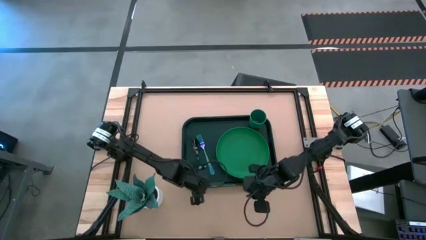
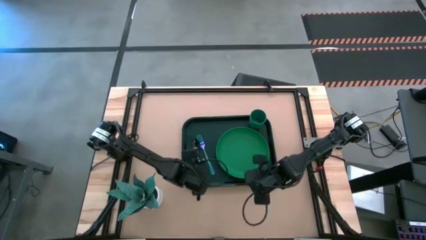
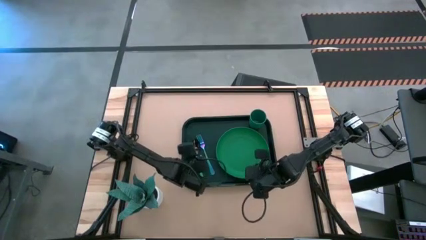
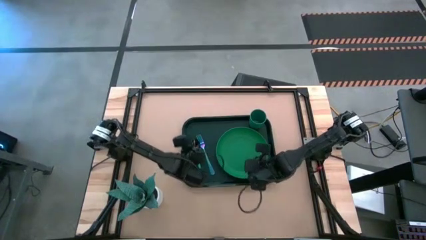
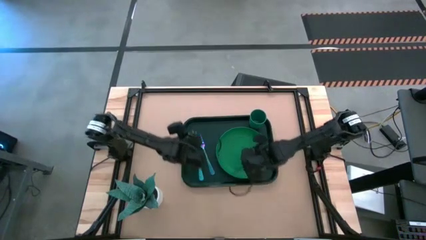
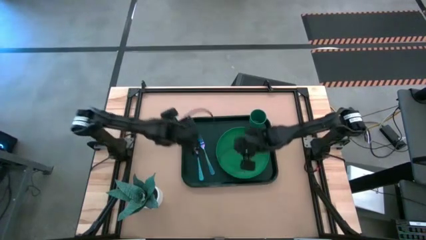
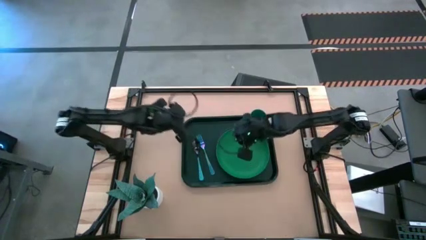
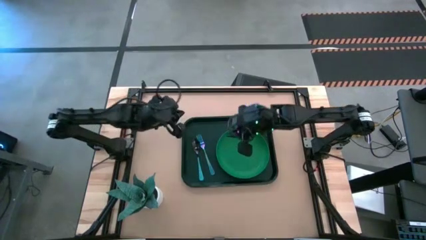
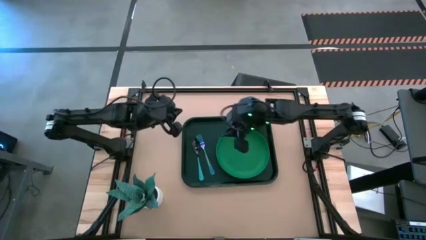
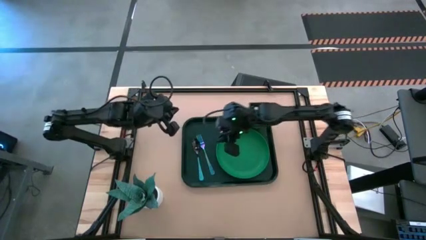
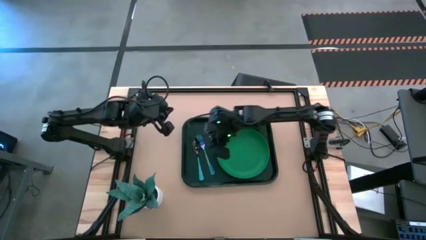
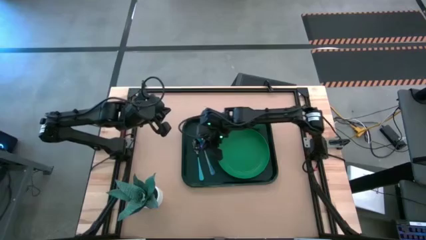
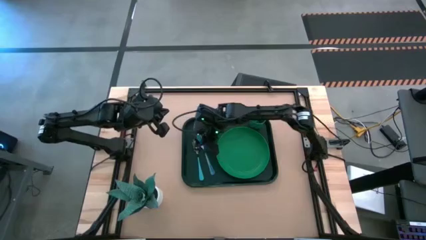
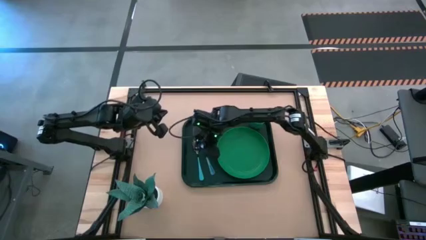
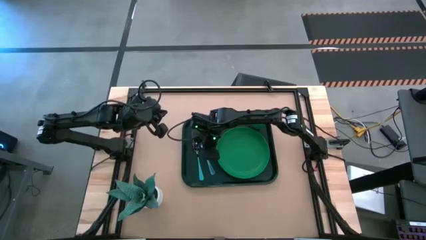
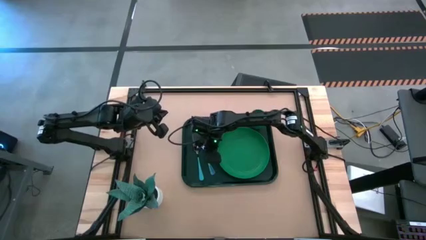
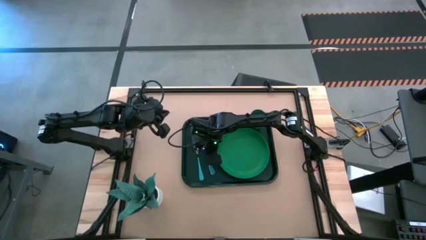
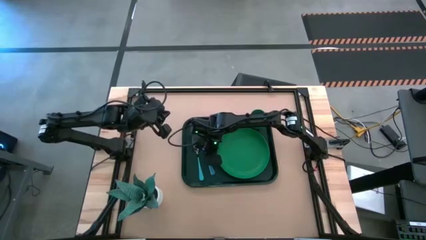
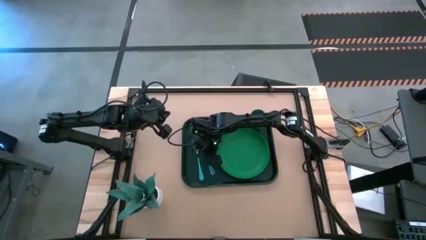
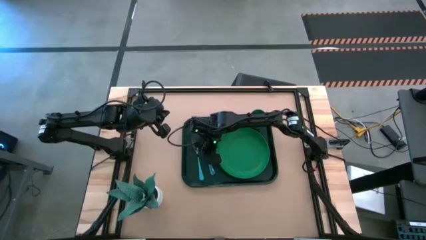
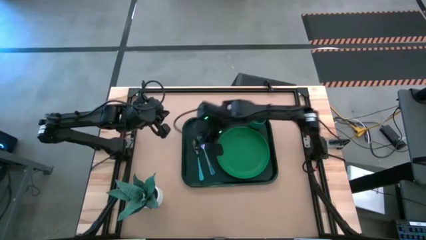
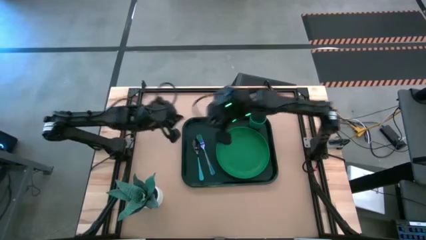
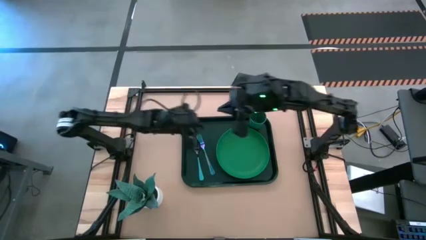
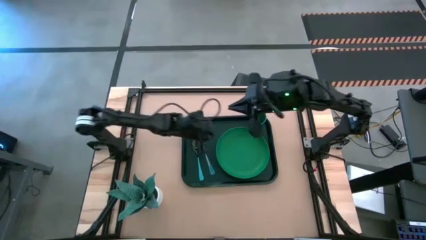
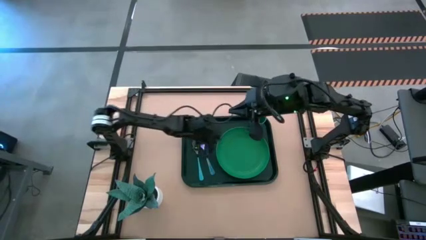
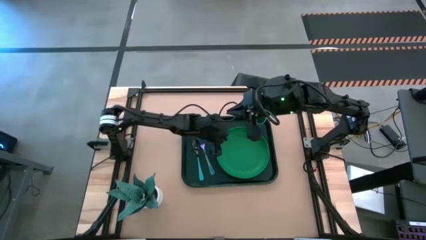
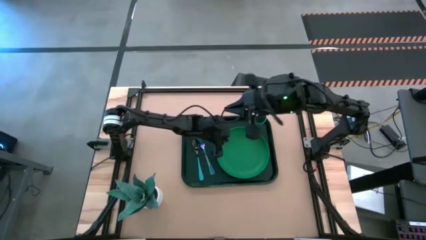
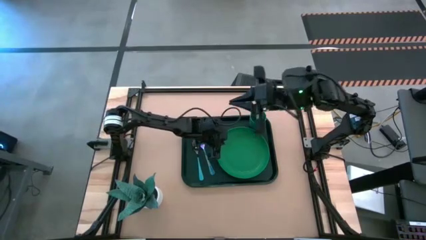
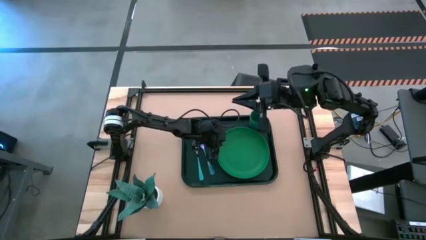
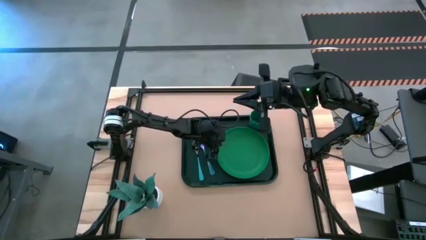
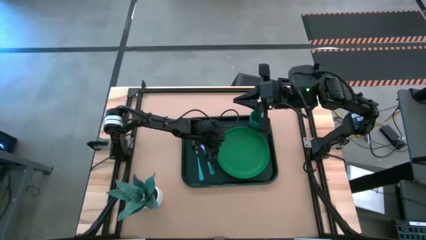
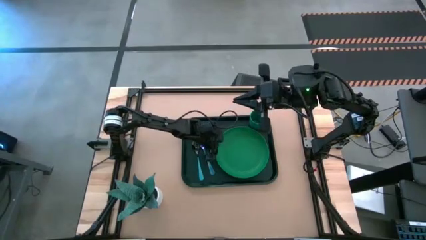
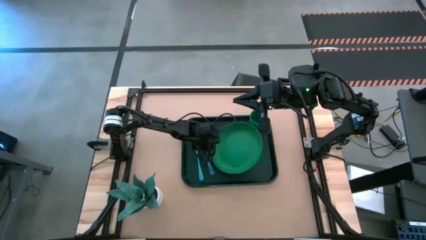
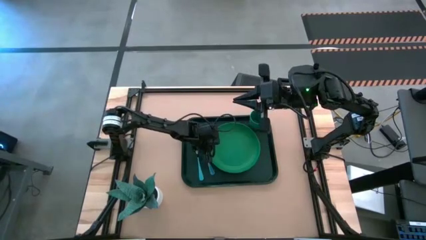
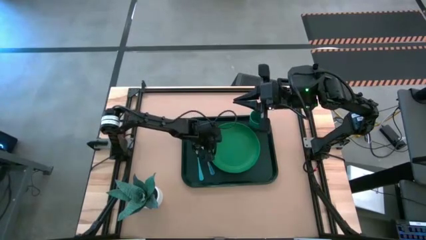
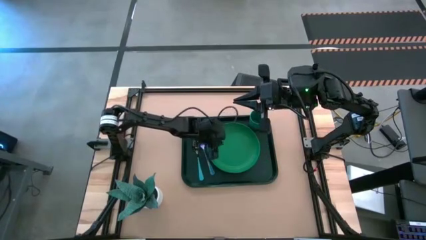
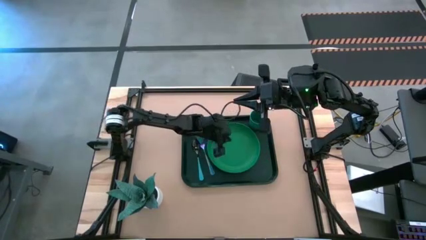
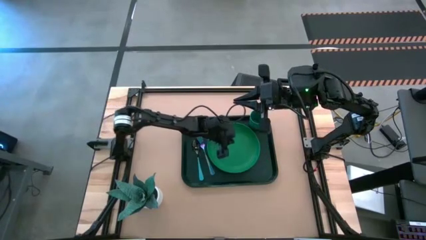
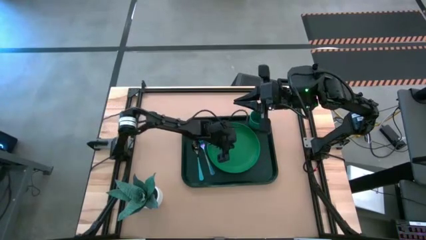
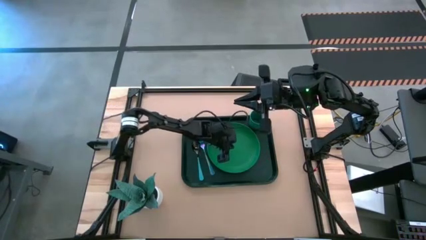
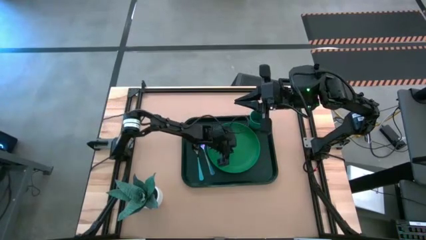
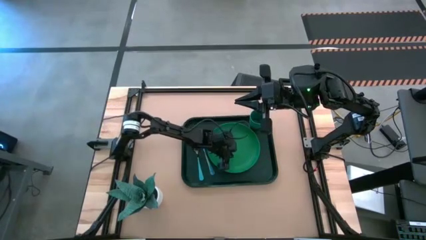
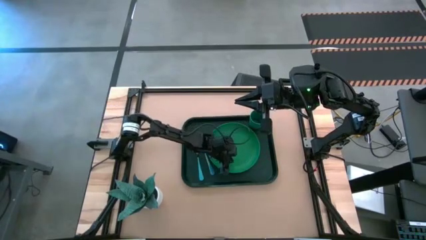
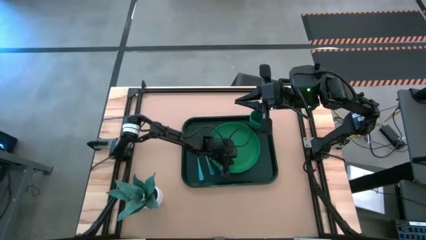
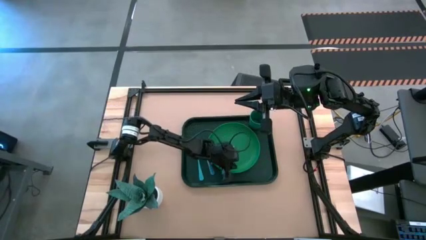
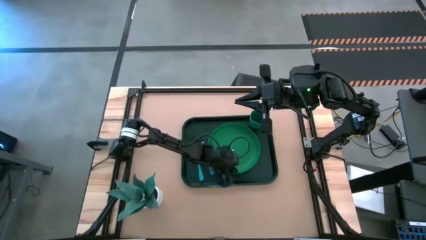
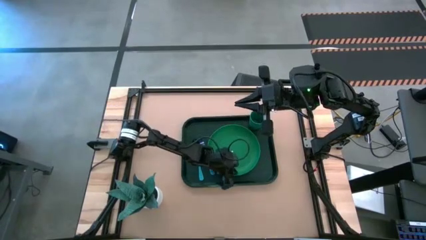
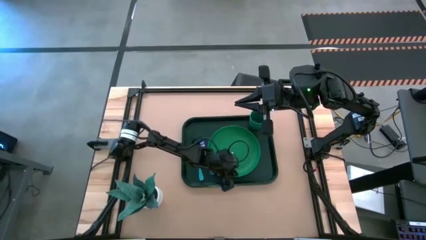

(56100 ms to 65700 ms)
Task: Pick and place plate/cup/fork/spoon on tray
Adjust the green plate on the dark green tray

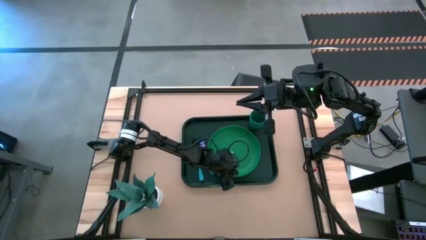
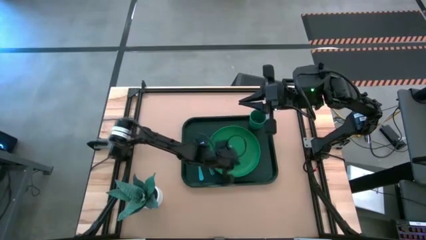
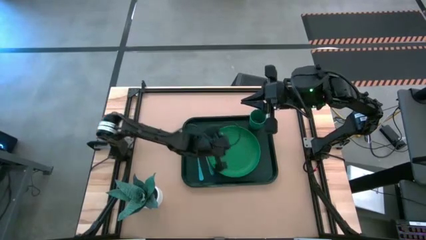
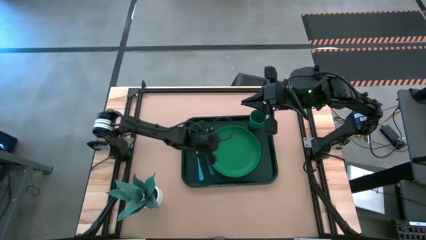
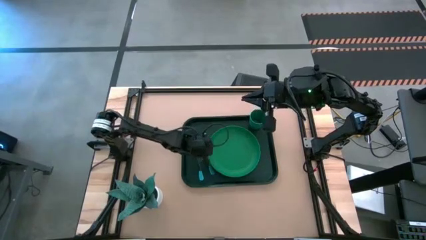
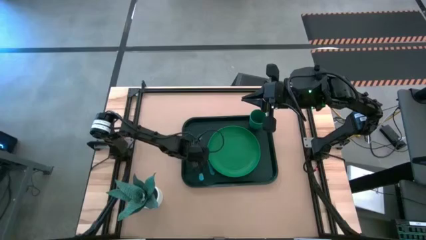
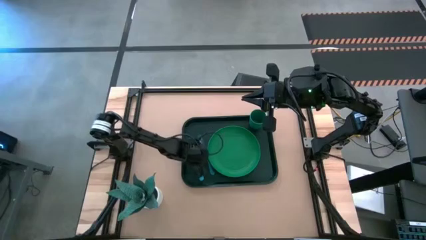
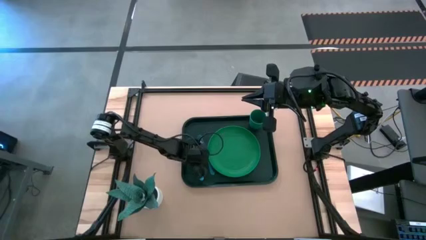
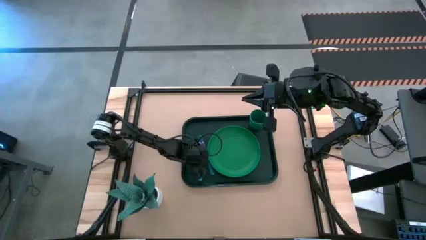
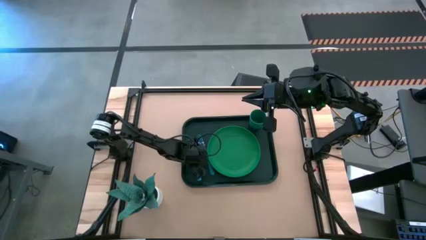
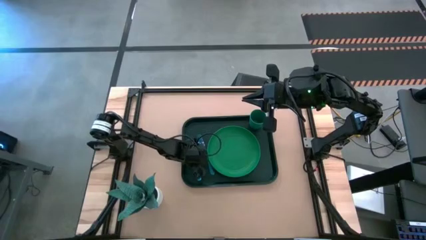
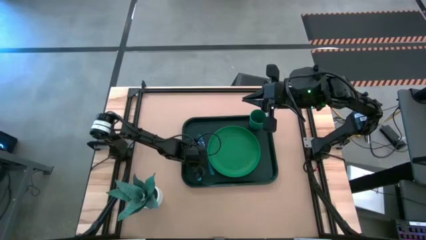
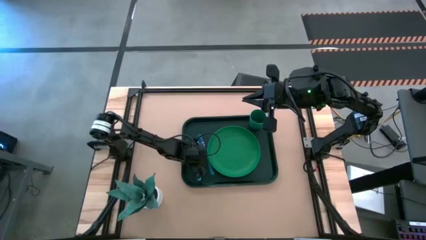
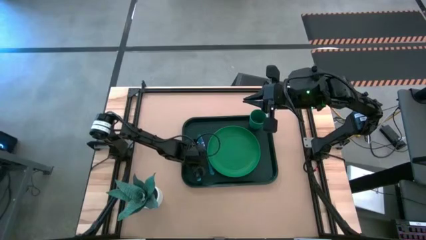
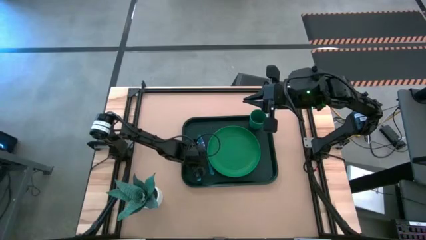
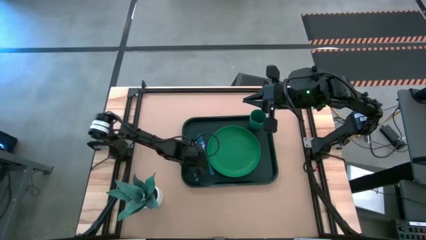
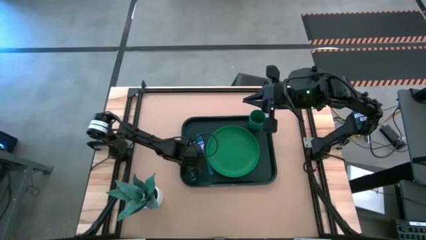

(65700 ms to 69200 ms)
Adjust the blue spoon on the dark green tray

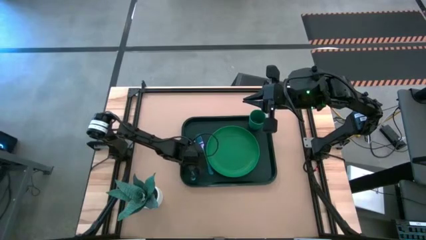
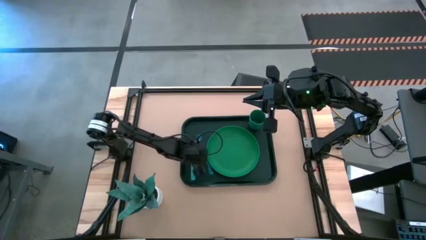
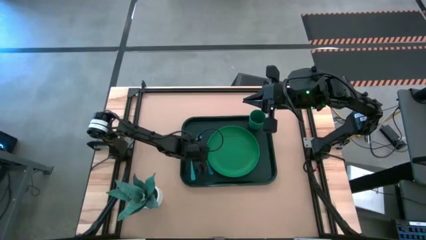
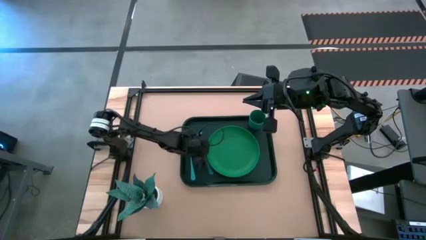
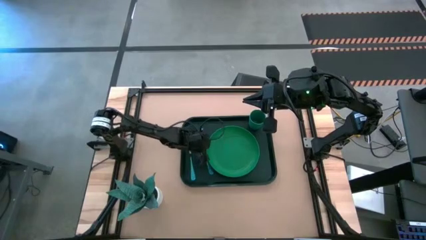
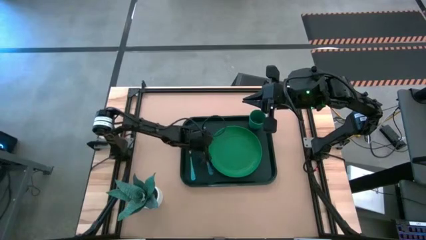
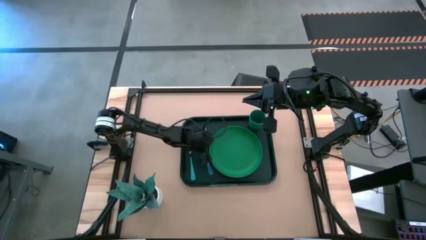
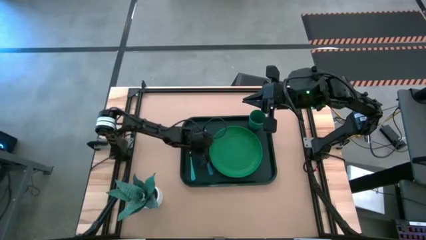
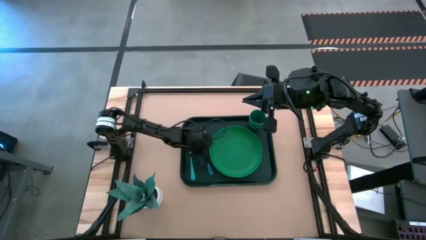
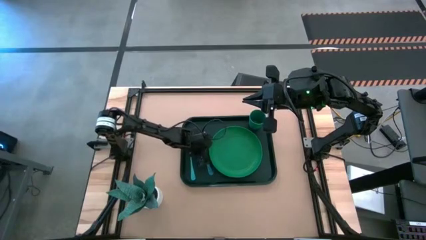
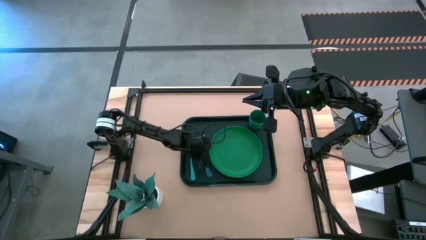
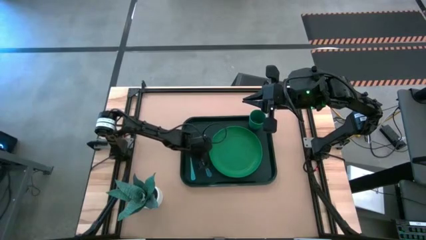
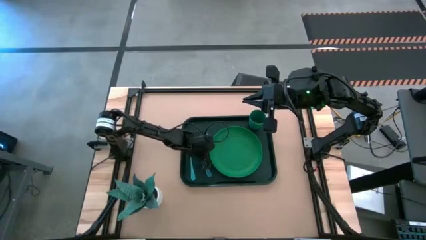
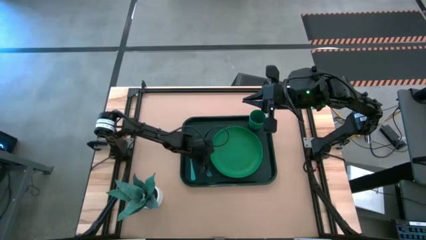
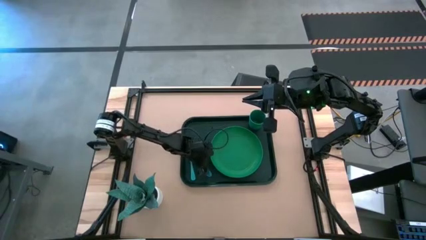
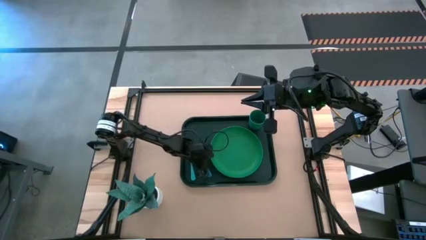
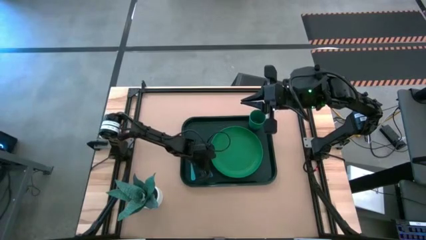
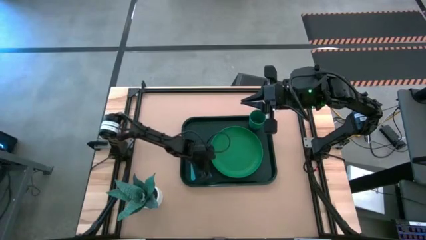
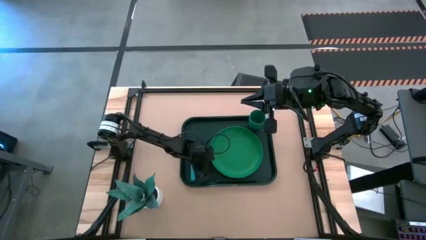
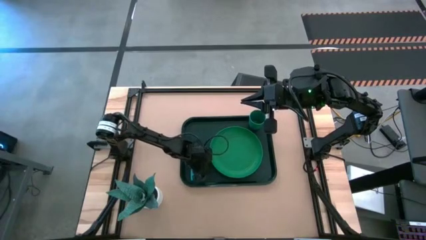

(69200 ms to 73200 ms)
Adjust the blue fork on the dark green tray
